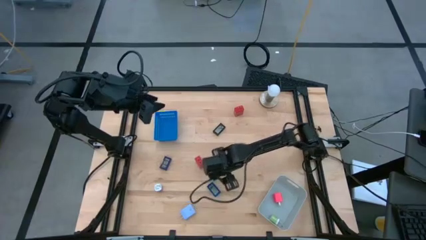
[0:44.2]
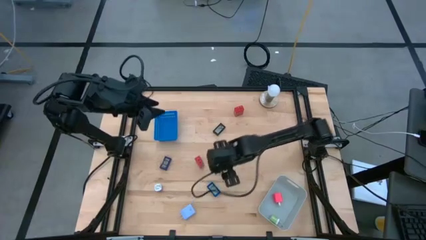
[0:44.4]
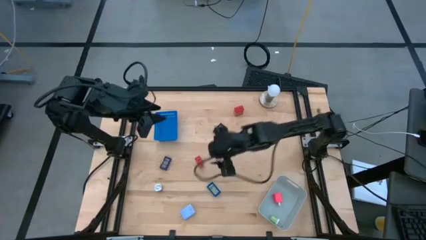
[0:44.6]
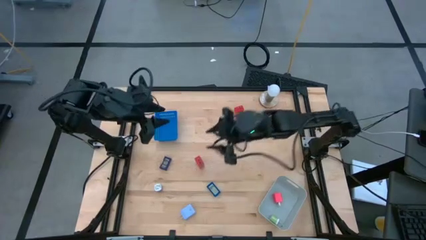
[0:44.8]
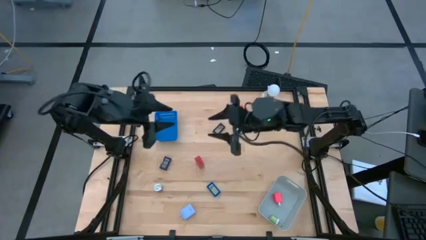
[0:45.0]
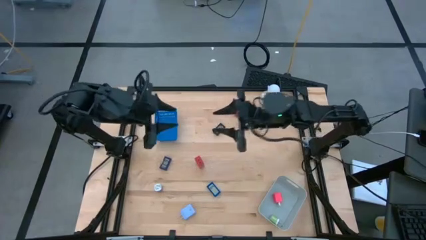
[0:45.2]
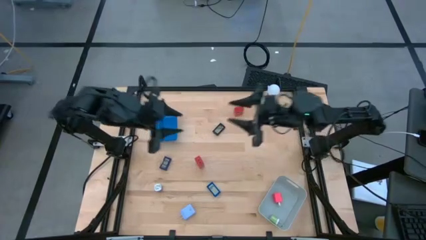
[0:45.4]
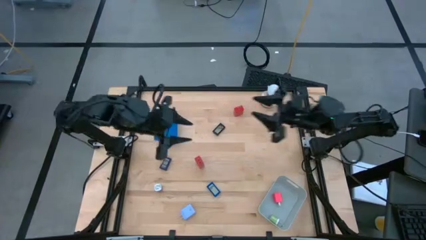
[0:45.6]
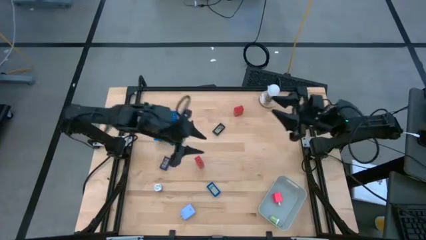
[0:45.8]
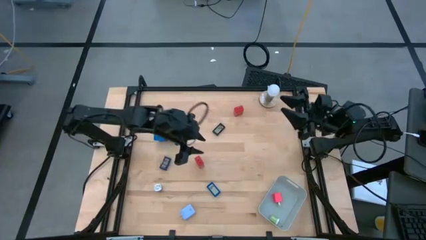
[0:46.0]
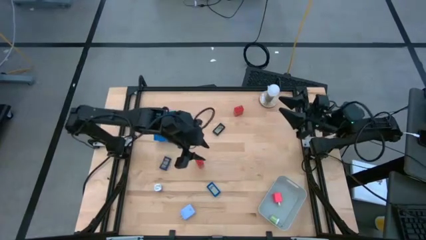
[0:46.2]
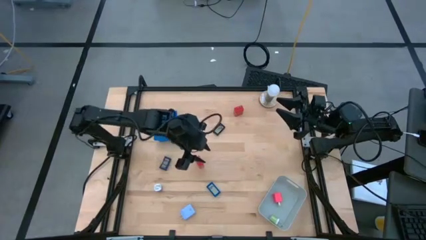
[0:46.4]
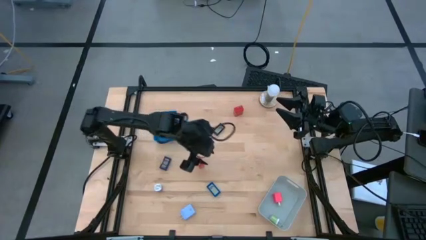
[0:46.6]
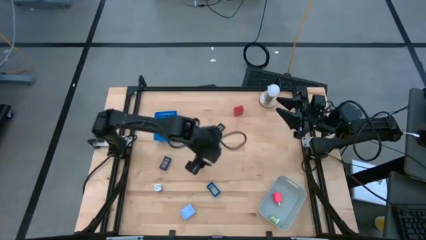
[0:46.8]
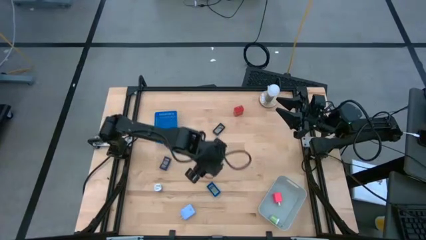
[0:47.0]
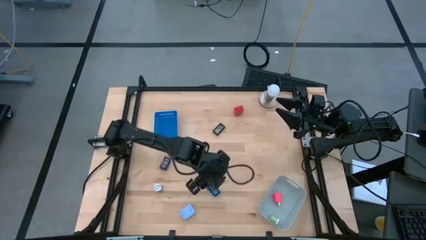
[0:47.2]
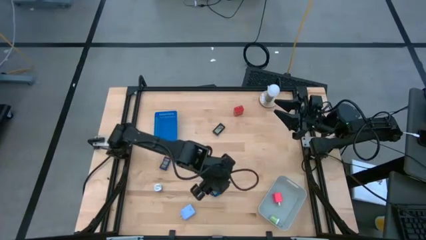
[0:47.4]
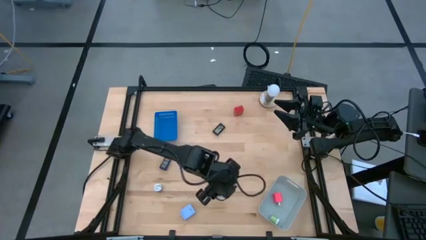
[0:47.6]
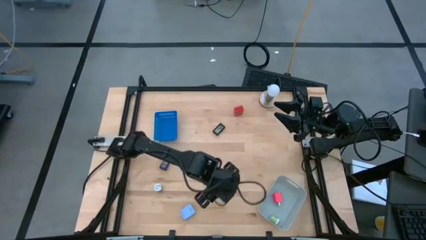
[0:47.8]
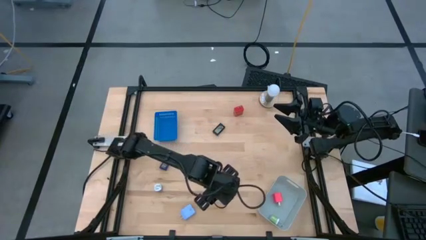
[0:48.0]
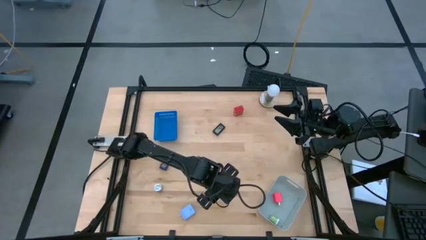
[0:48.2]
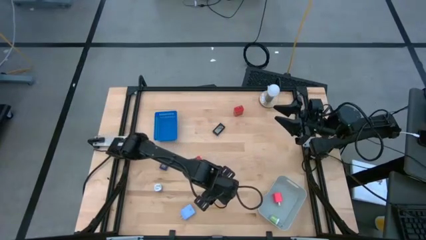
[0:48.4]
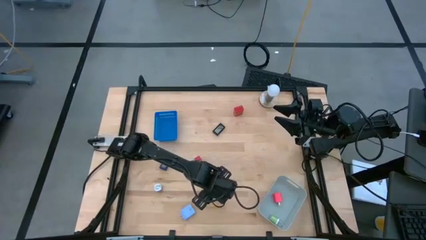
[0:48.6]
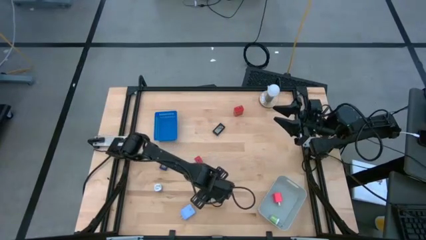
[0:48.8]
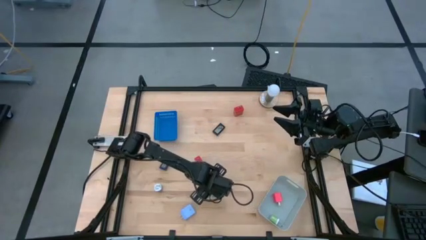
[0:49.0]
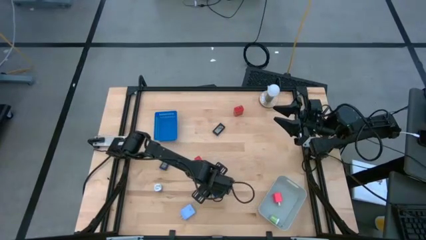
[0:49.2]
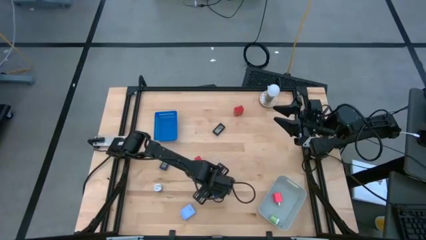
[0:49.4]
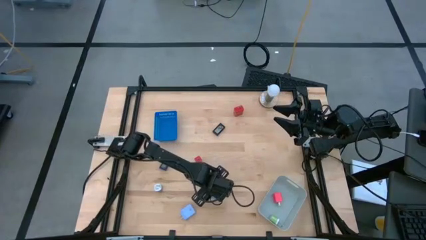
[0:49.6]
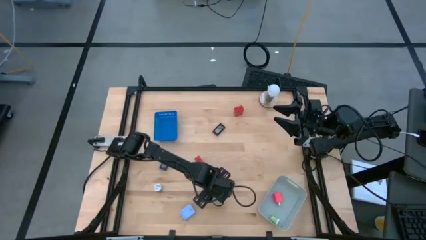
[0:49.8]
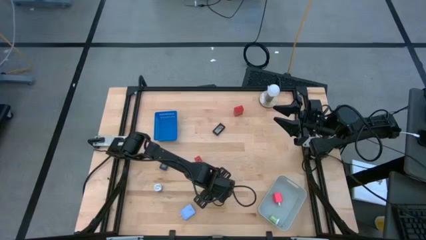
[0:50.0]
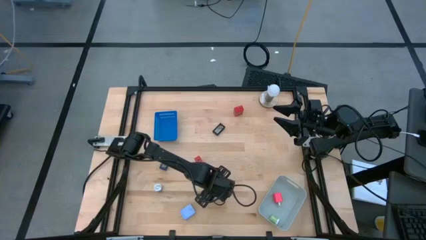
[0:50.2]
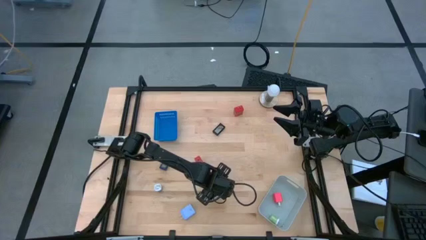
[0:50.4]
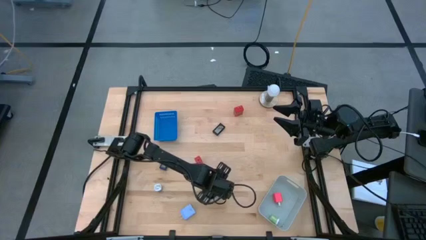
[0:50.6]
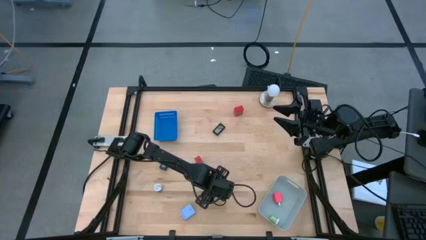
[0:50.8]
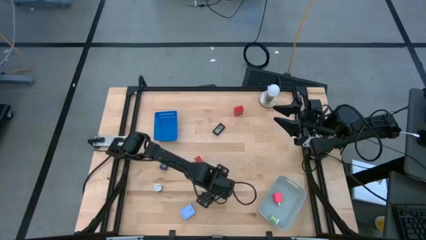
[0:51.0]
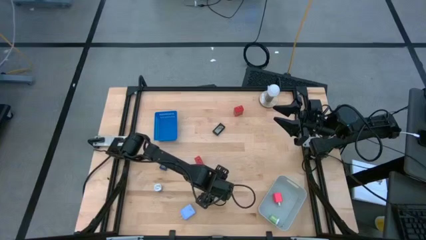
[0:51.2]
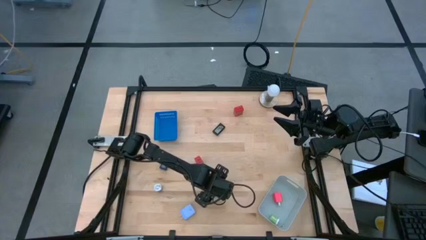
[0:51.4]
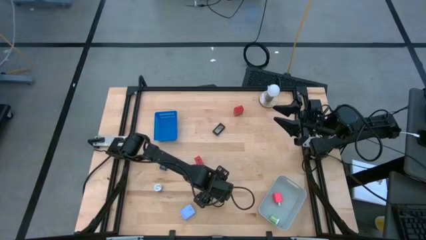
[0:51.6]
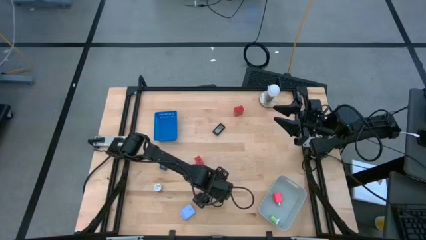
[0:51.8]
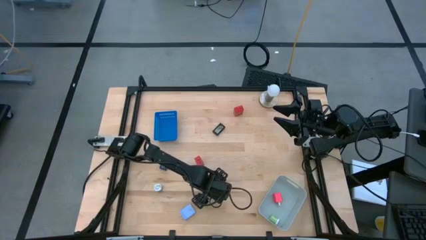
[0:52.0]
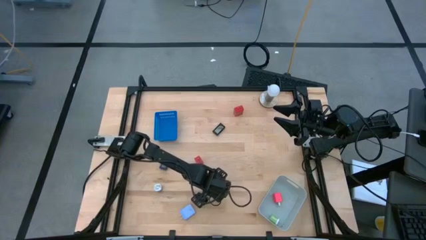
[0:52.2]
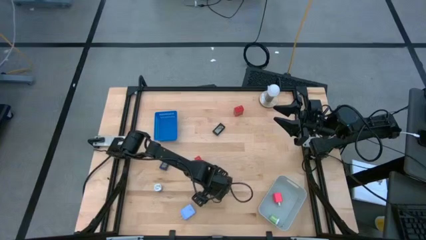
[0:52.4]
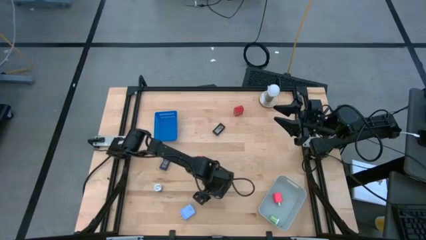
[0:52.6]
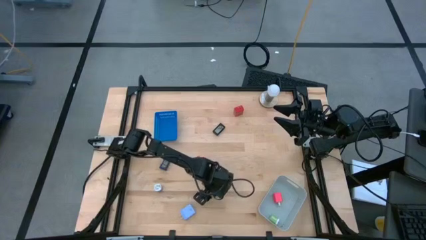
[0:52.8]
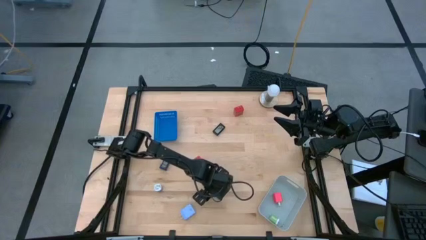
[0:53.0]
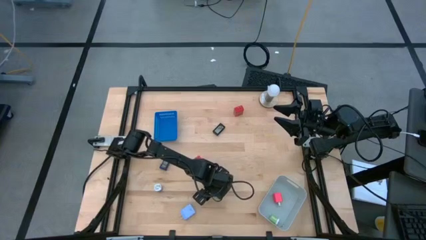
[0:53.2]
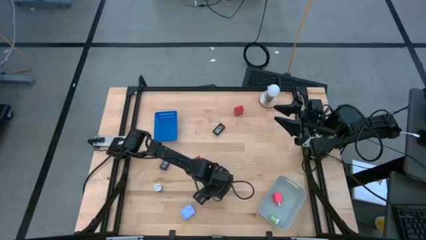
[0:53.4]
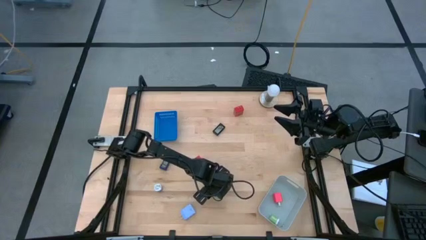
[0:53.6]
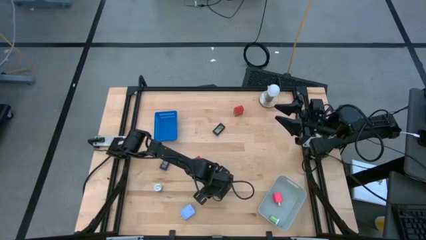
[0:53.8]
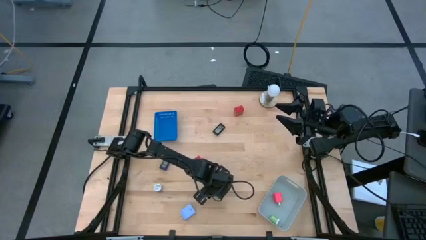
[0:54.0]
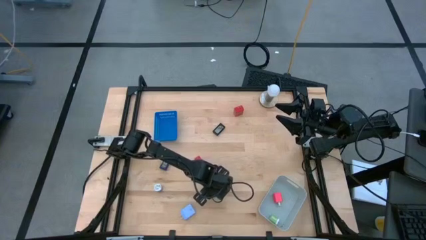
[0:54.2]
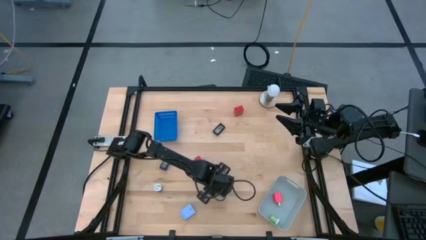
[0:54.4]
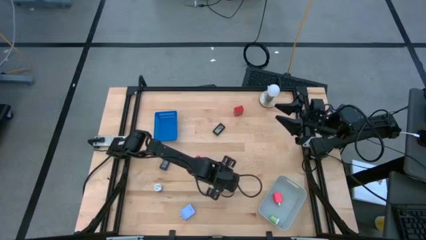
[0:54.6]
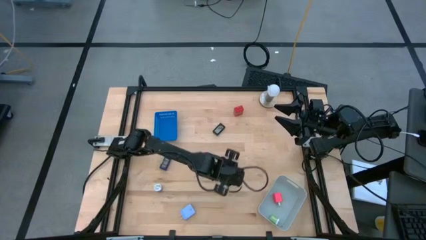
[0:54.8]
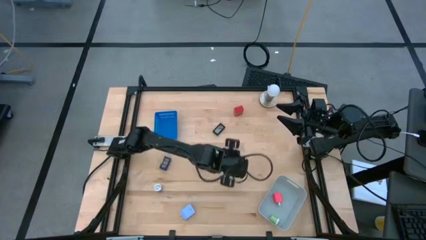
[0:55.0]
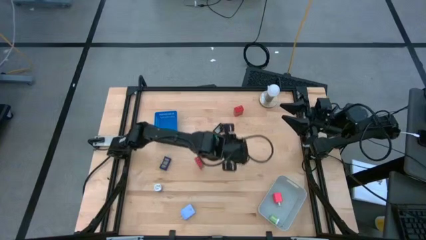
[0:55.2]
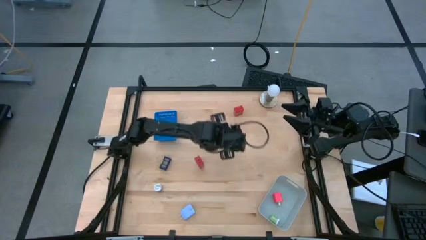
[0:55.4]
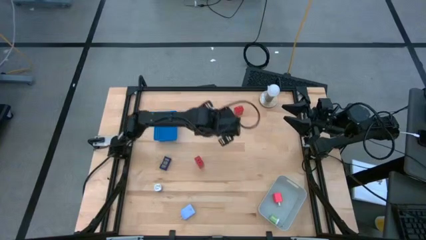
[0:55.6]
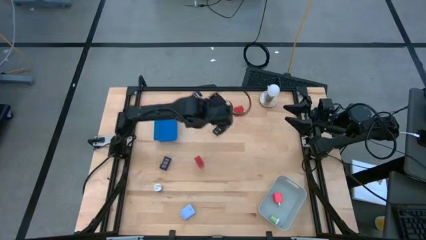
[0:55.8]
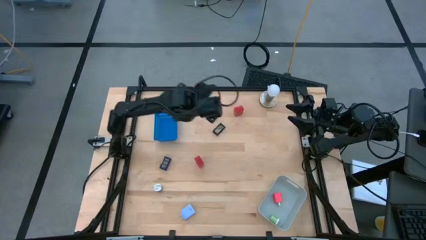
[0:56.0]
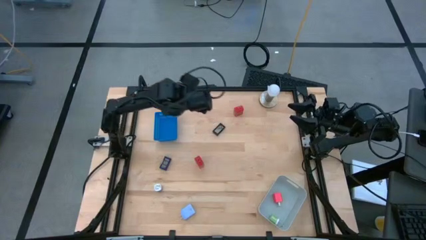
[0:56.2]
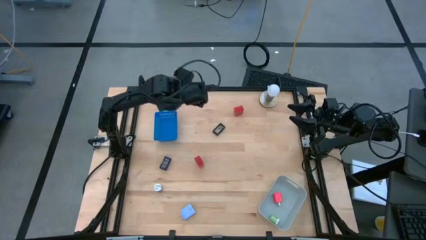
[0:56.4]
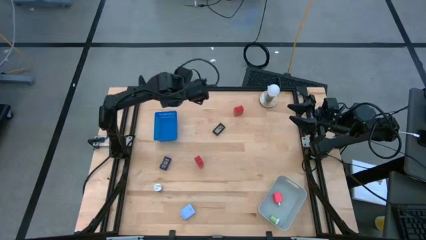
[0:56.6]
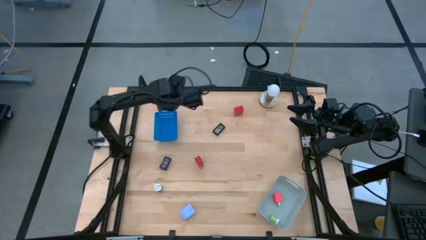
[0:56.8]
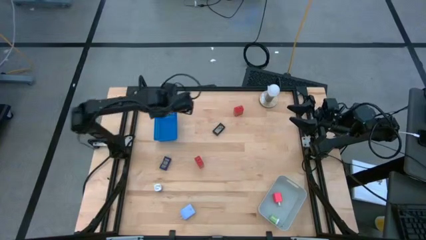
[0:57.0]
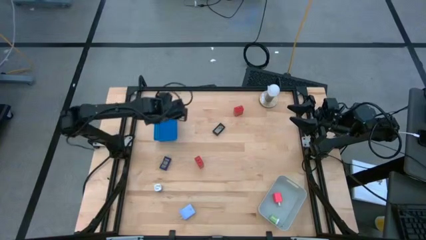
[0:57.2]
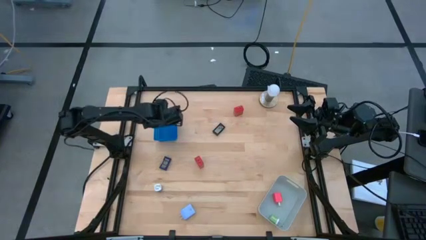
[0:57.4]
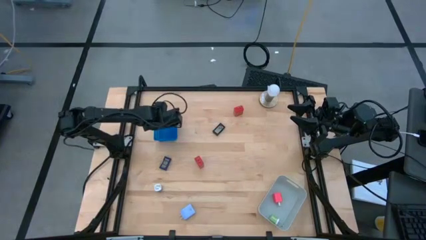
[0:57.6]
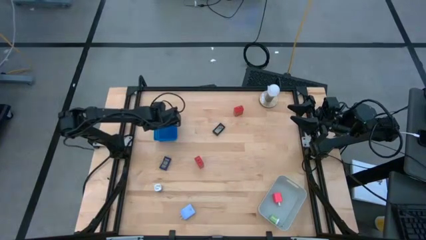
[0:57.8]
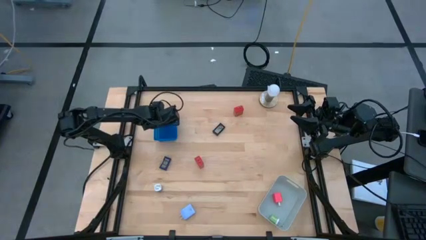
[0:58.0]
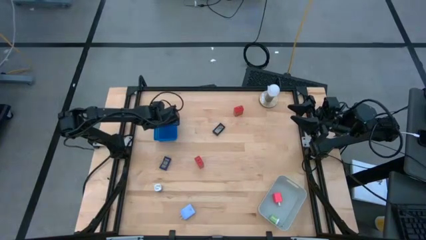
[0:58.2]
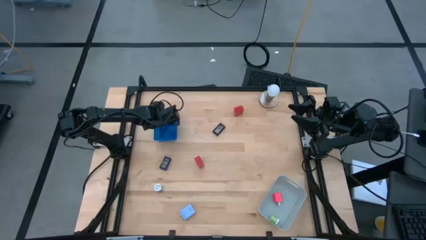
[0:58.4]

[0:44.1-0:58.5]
Task: Pick & Place Office items
Put the blue digital timer into the blue bin
